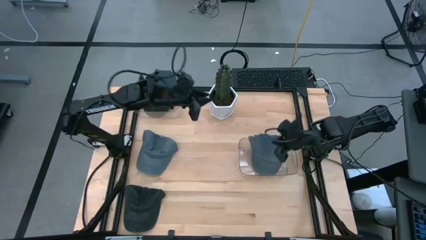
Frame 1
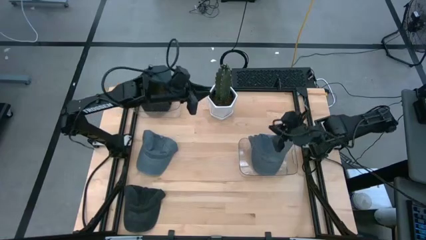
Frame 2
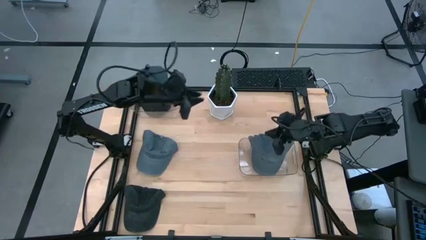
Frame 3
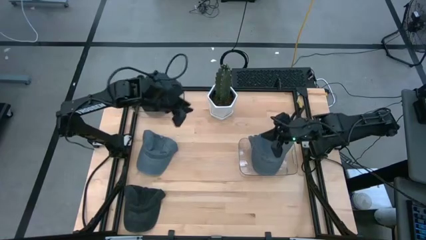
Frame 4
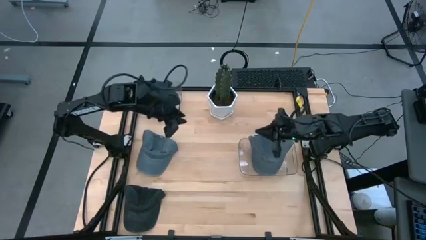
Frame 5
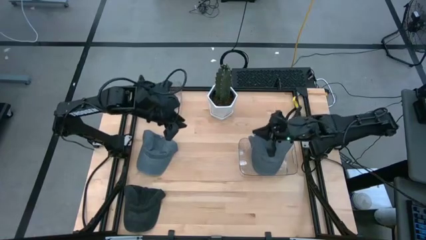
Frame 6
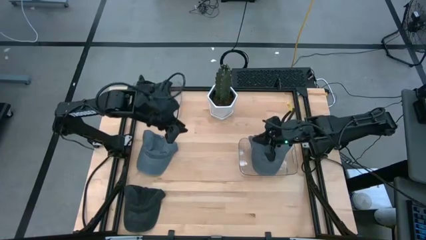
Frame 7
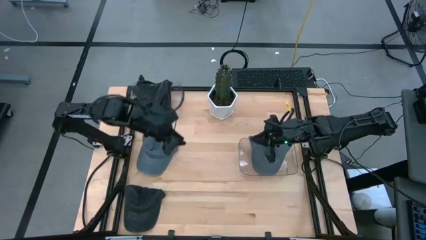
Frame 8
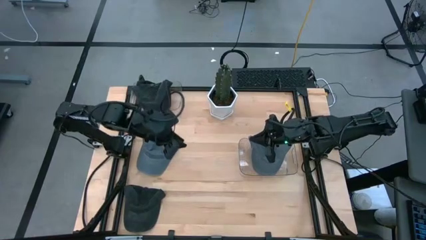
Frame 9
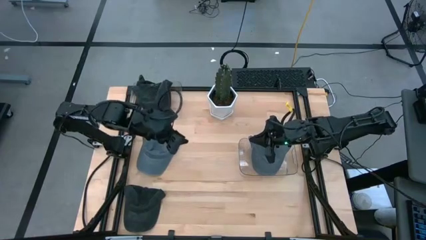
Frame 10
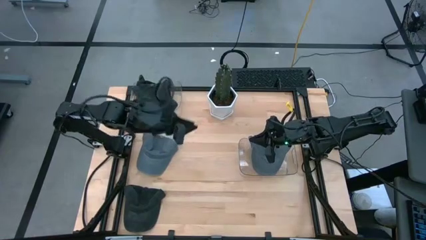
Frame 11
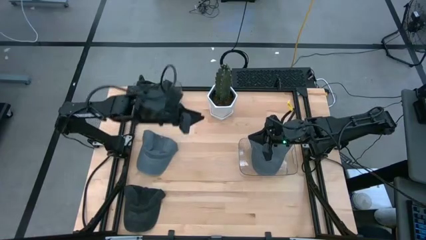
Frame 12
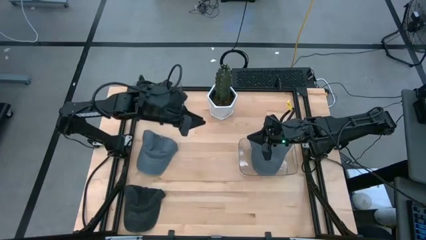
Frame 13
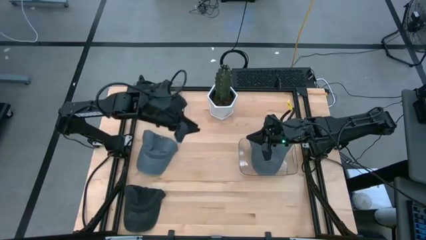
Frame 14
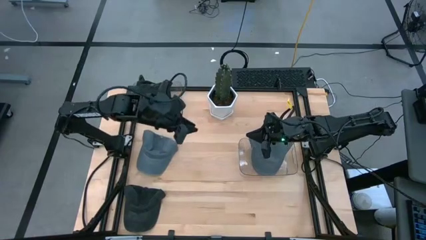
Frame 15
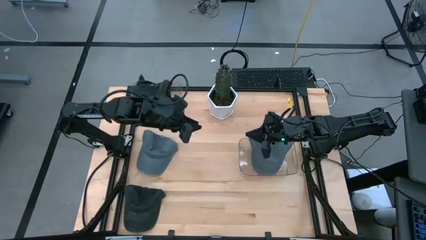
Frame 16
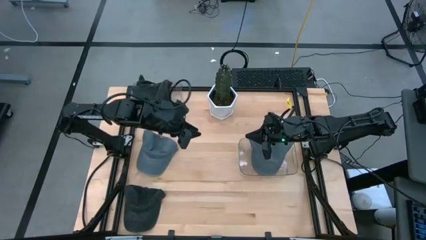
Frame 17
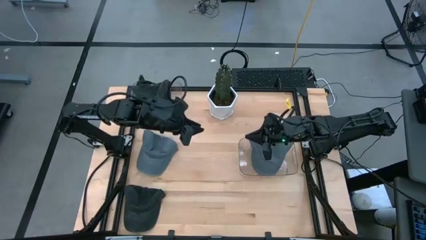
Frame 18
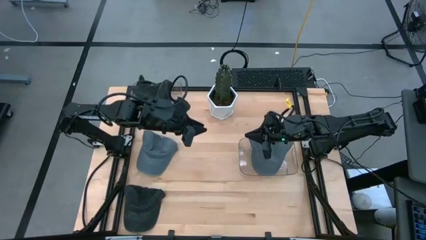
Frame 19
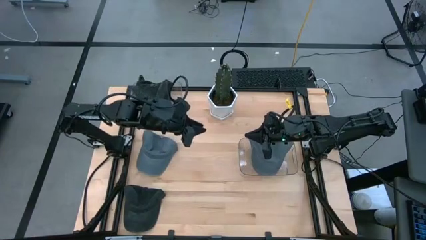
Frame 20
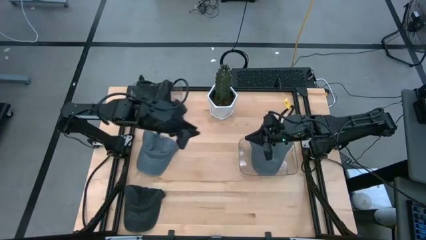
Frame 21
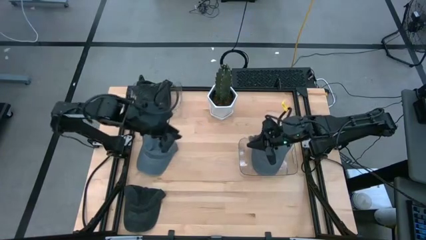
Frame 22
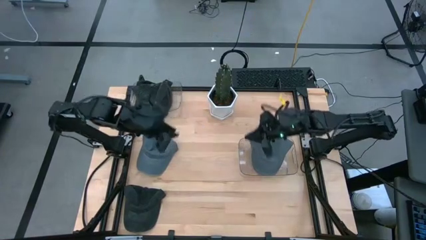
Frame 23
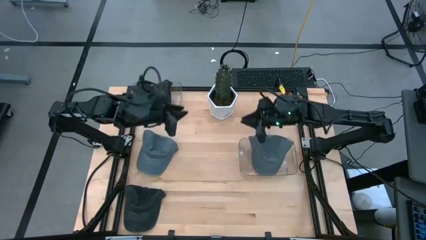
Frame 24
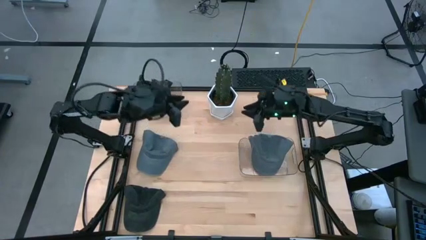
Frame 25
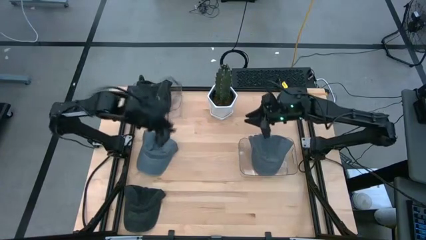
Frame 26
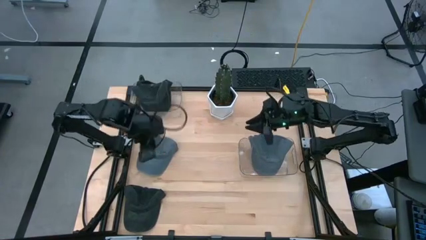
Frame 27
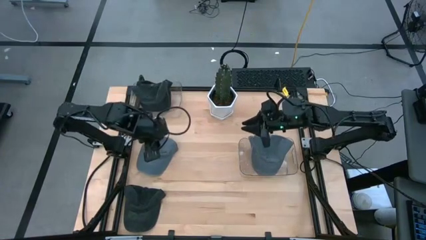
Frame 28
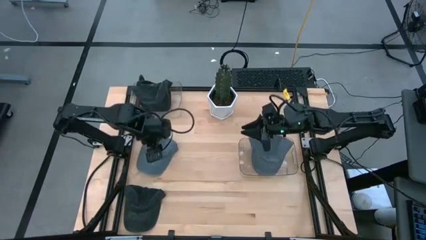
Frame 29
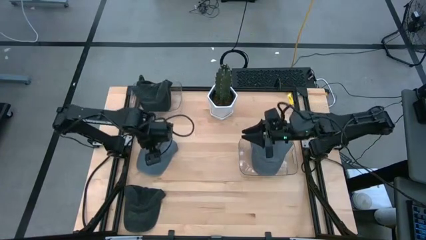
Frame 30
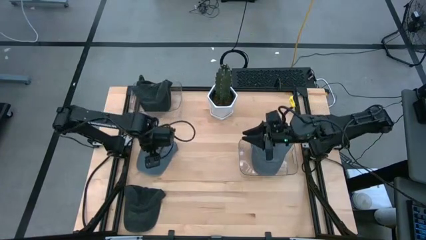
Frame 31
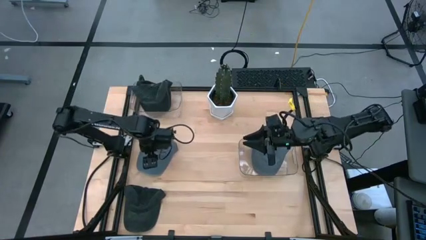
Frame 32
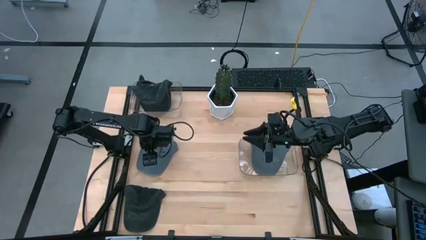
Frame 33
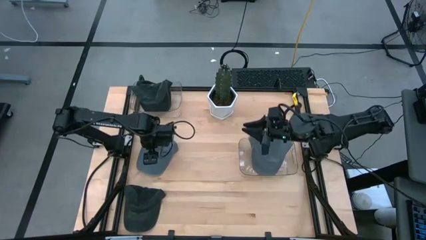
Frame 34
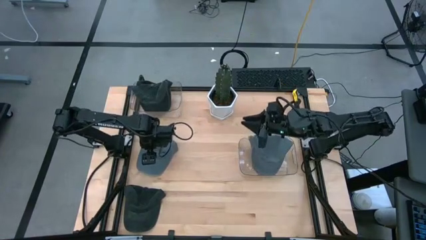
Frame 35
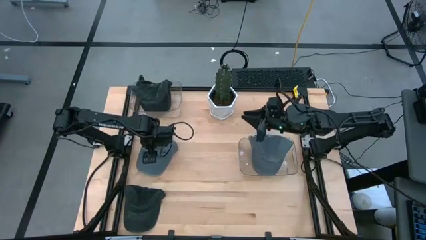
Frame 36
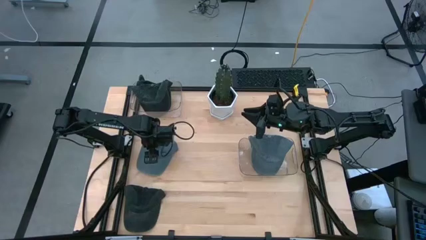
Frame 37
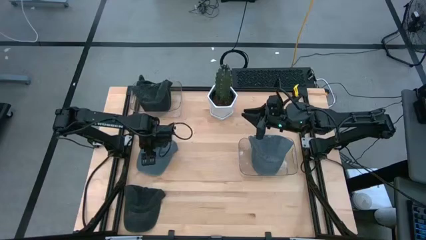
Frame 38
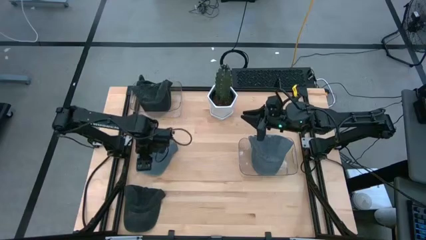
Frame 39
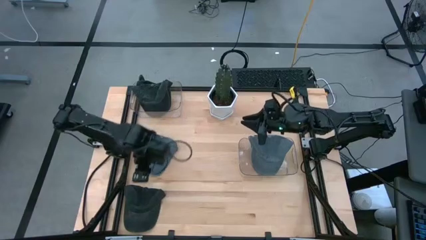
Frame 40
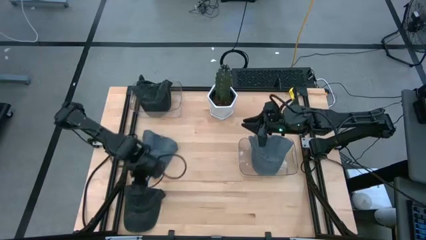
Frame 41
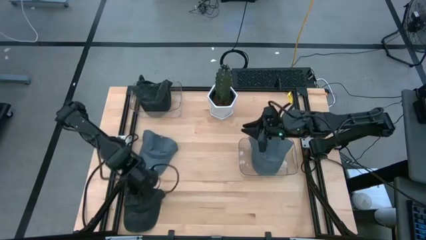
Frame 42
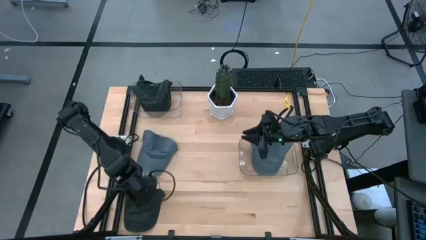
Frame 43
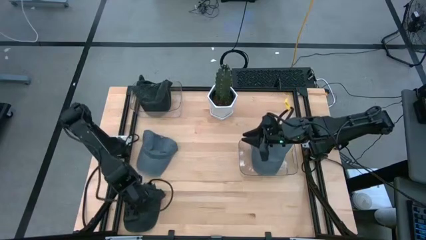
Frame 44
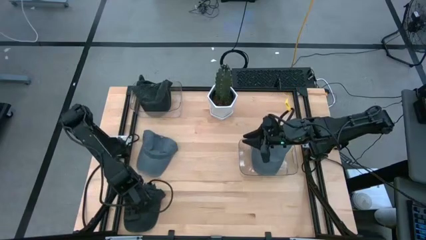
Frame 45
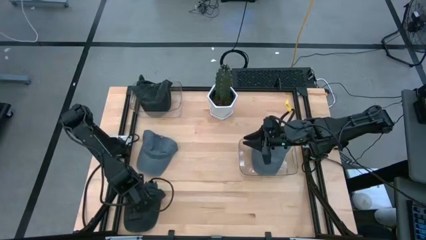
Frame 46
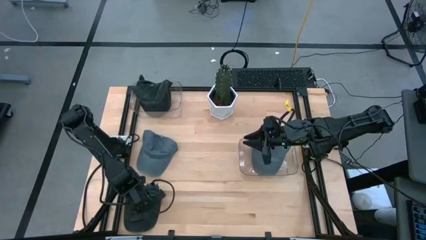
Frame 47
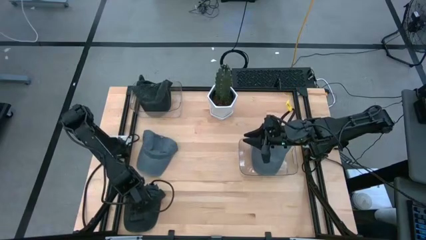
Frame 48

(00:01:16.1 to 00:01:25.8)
Task: Pick & Place hat
Put the black cap into the top transparent bin

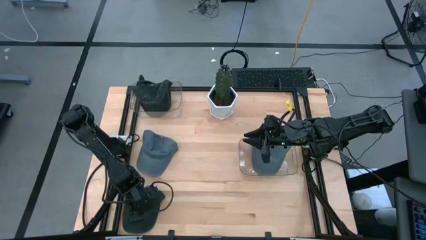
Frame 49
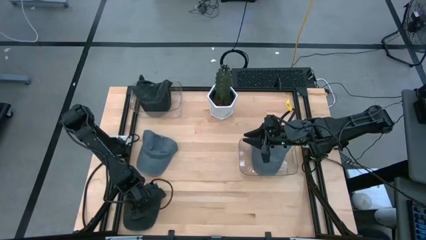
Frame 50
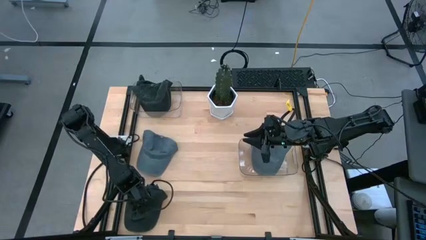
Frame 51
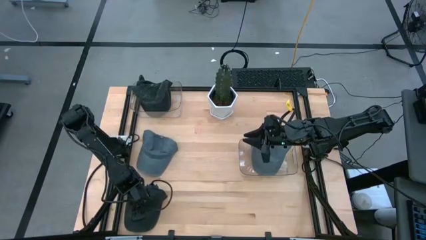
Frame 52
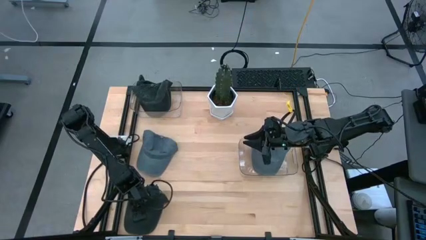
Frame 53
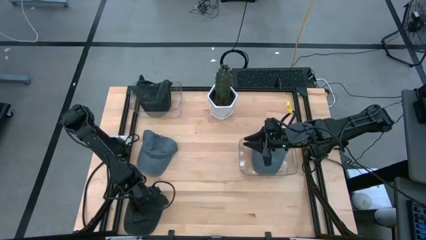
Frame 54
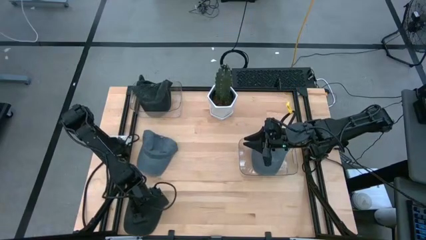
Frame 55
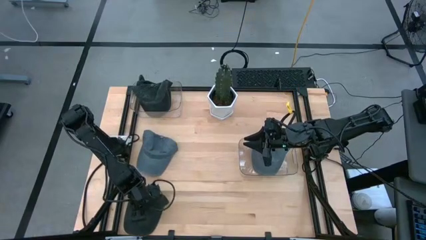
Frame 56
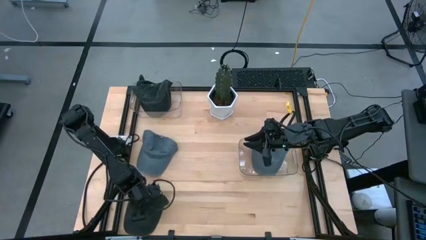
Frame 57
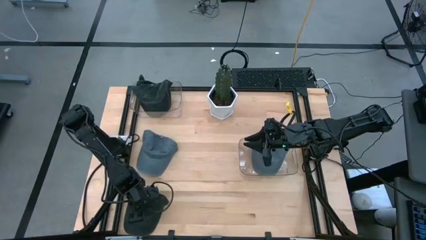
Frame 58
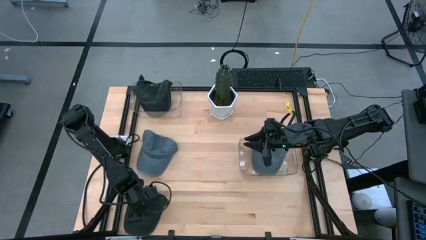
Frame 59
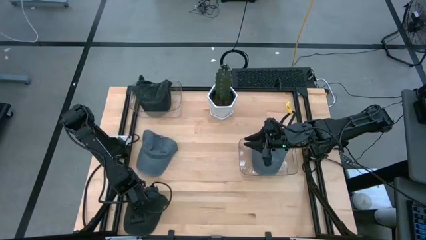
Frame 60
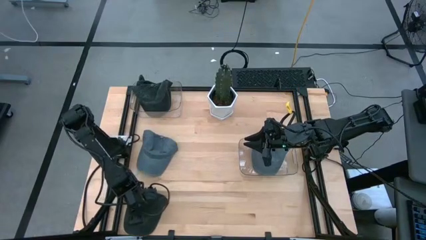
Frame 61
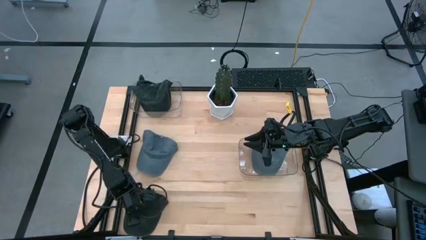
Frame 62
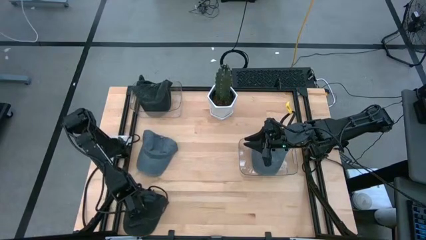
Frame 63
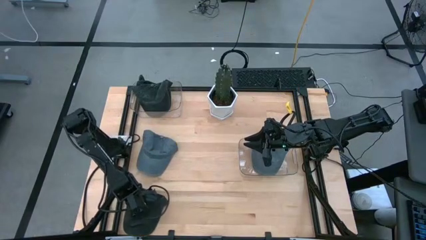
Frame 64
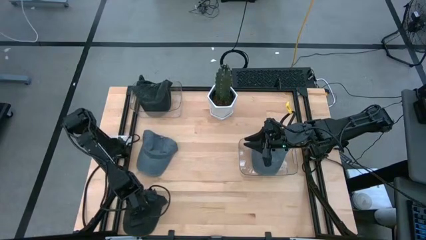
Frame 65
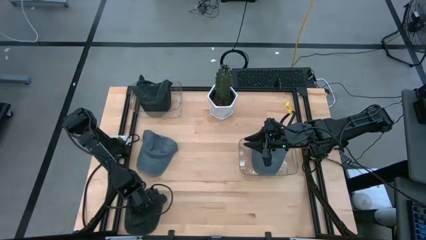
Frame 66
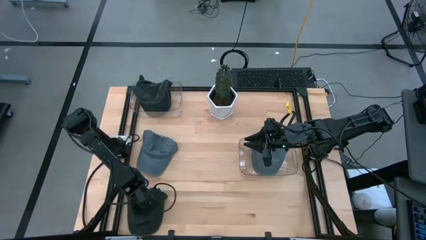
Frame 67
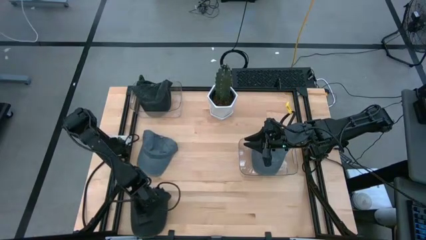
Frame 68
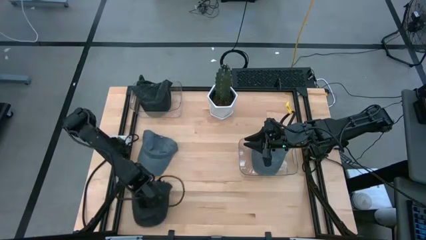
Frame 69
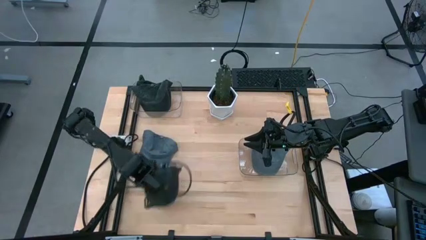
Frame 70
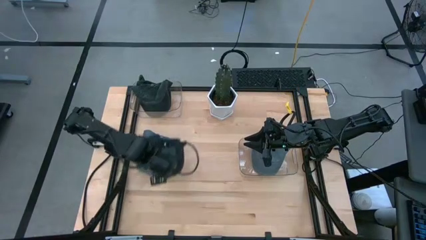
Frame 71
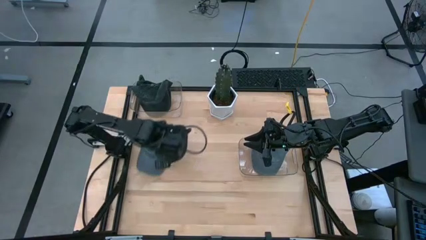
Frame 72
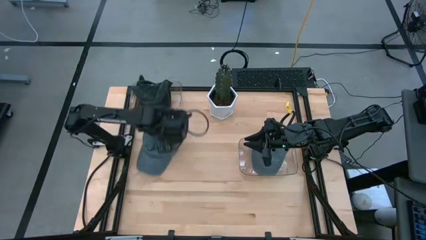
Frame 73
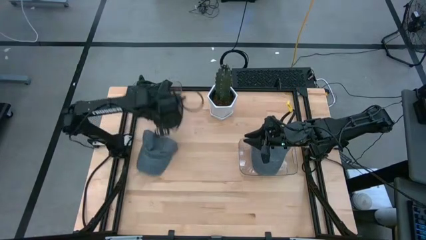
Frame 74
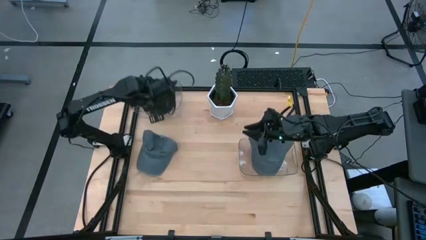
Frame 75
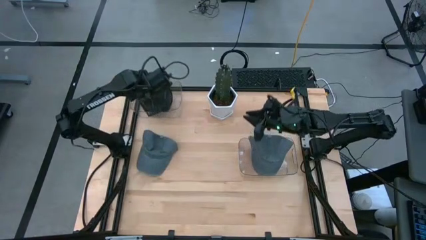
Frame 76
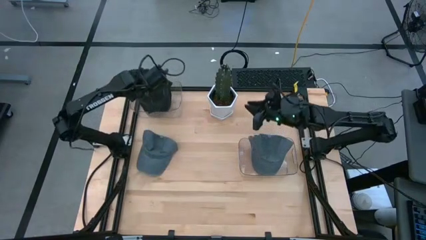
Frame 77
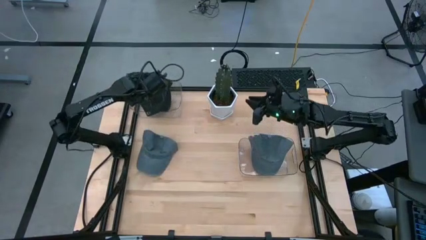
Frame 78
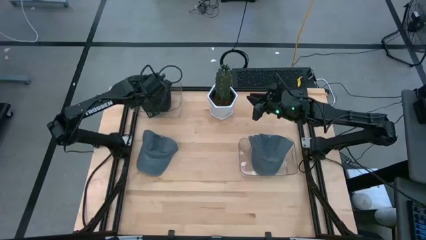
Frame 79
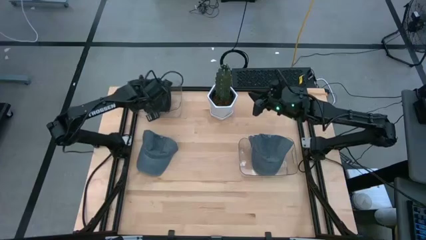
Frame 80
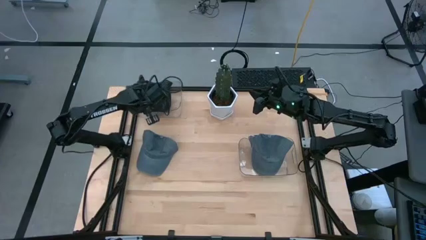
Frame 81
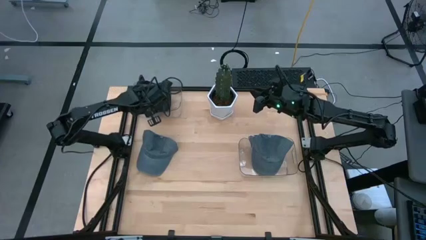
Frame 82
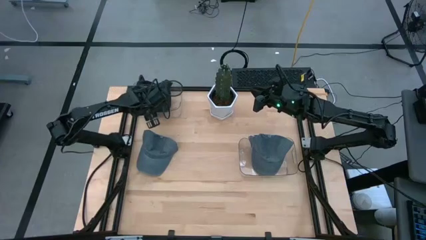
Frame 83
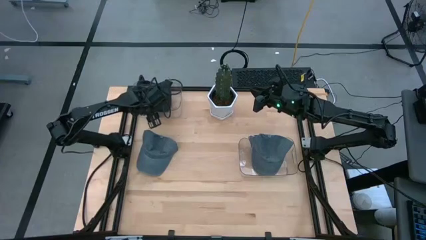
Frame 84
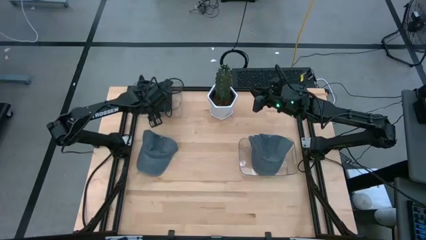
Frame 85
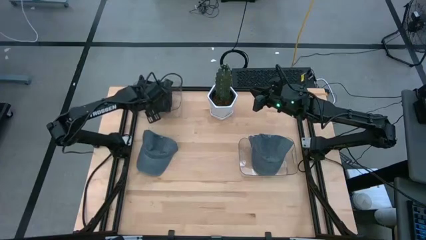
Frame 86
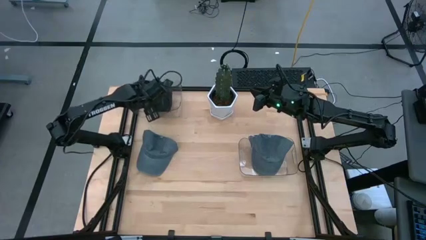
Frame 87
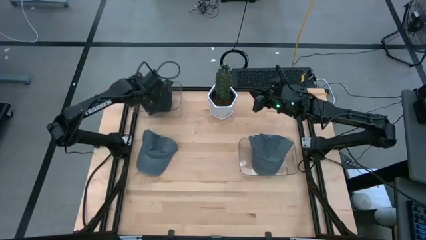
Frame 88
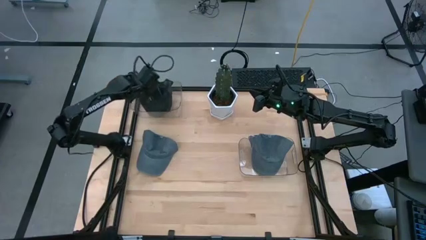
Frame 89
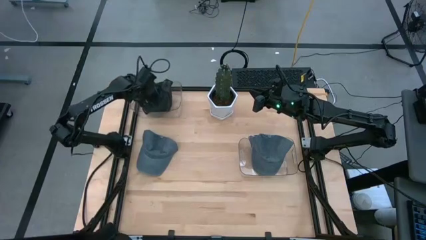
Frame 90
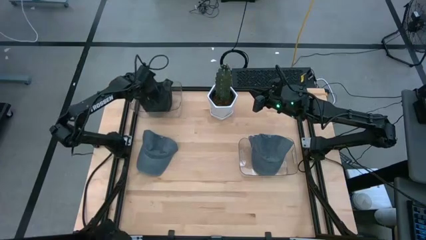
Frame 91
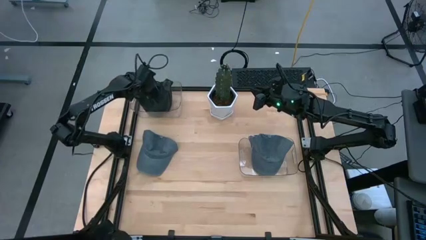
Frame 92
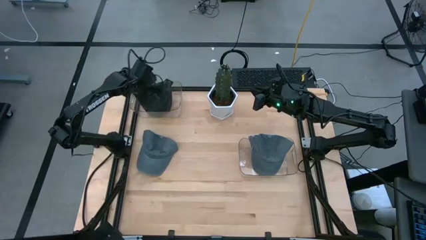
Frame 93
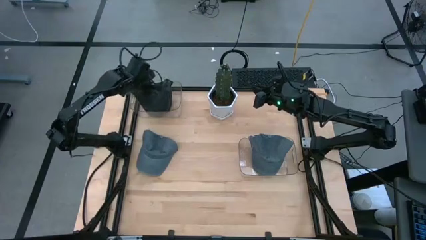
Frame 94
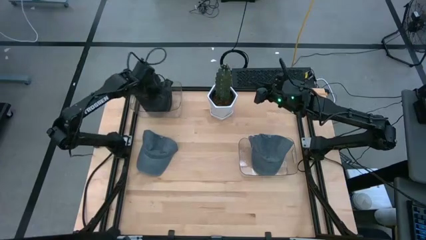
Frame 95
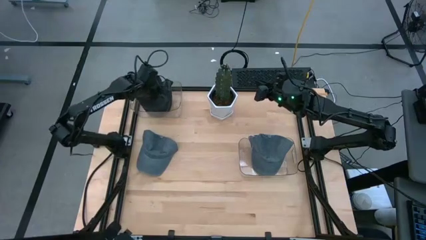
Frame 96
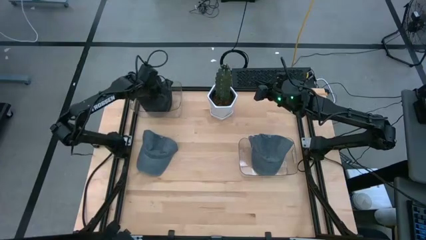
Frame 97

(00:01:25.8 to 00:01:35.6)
Put the black cap into the top transparent bin
